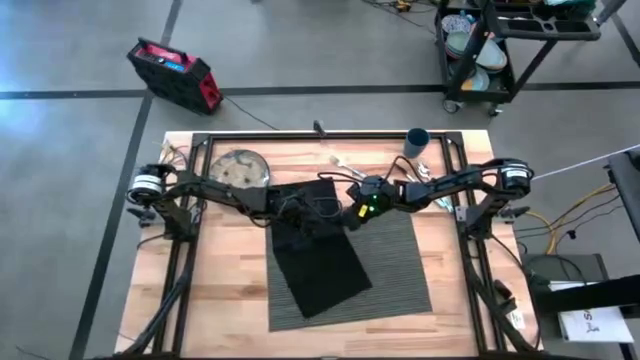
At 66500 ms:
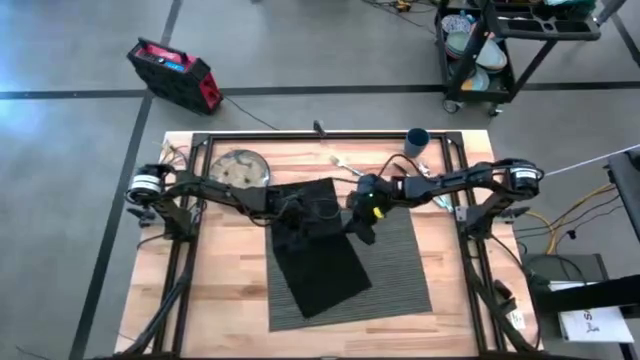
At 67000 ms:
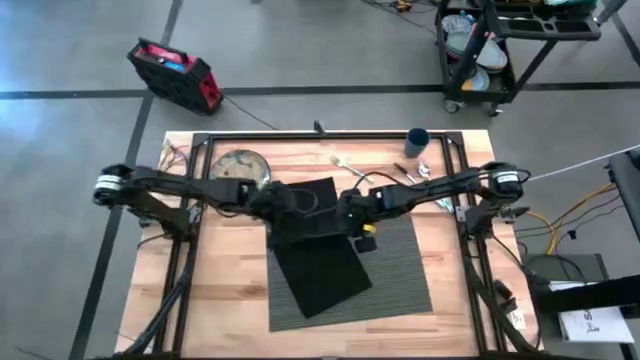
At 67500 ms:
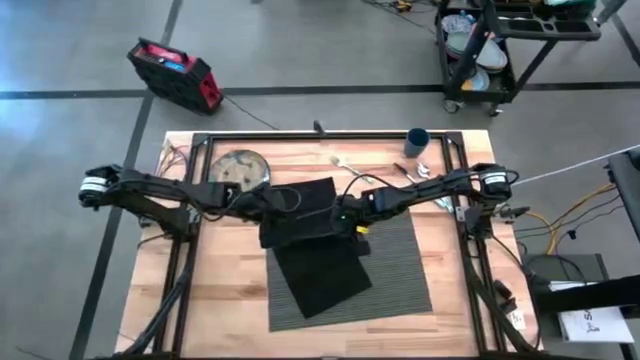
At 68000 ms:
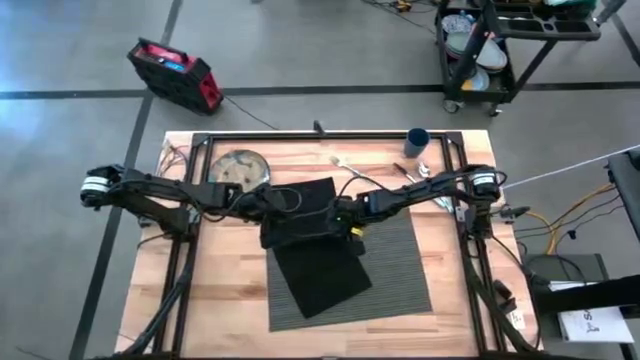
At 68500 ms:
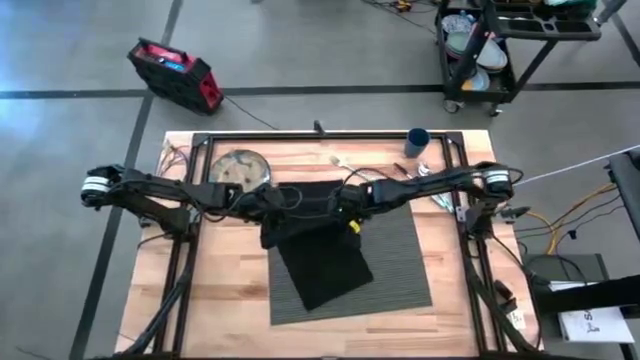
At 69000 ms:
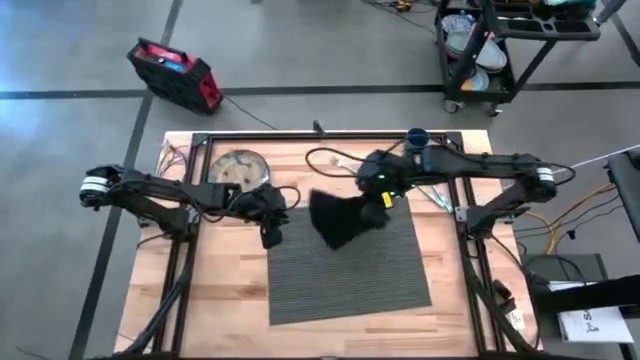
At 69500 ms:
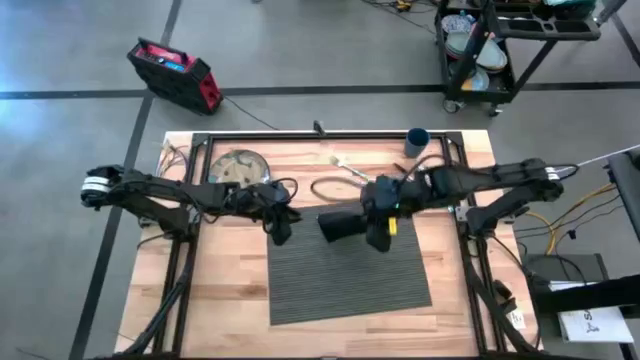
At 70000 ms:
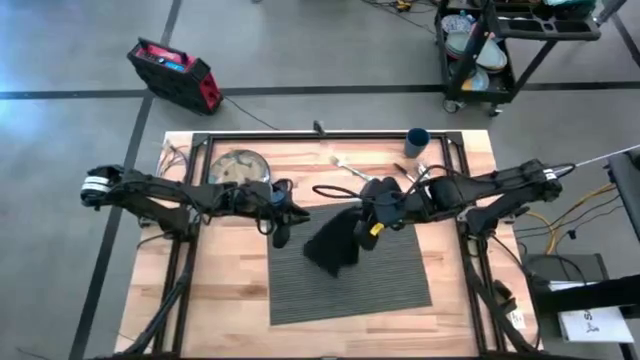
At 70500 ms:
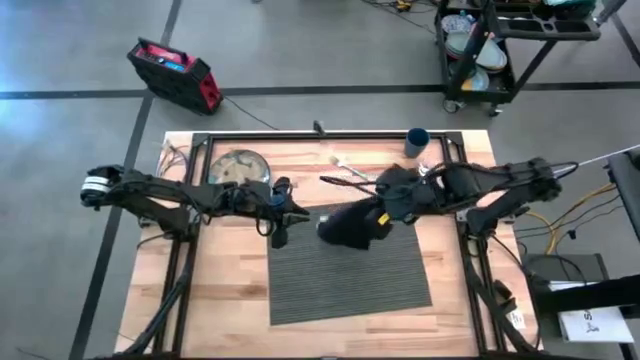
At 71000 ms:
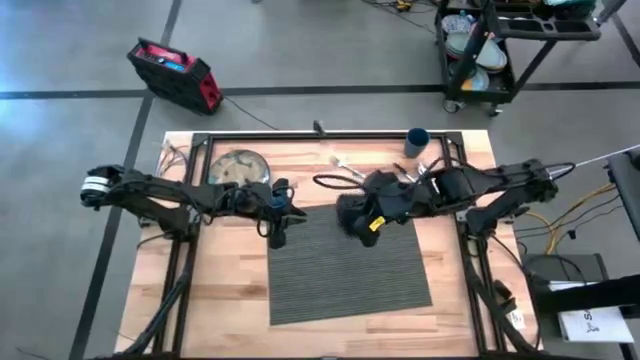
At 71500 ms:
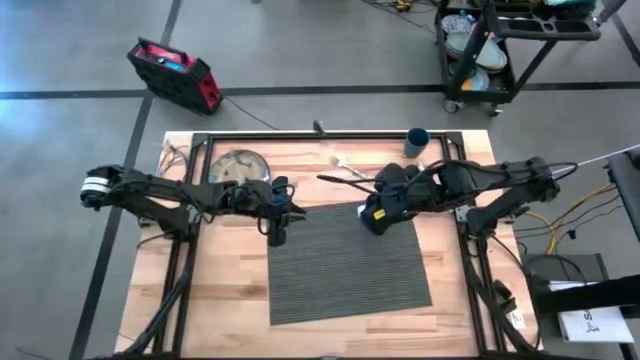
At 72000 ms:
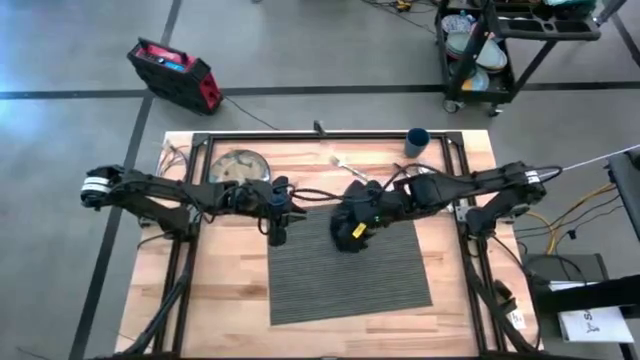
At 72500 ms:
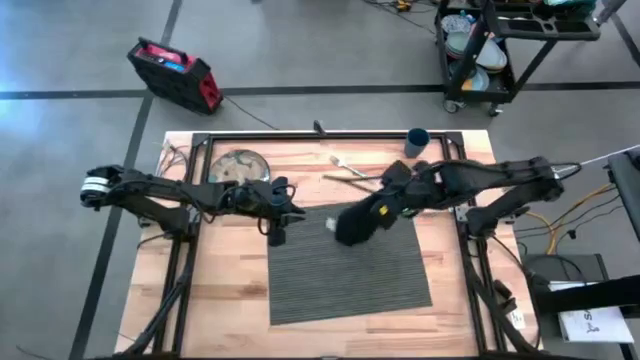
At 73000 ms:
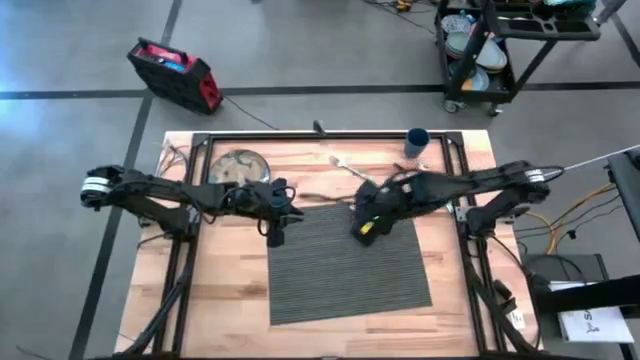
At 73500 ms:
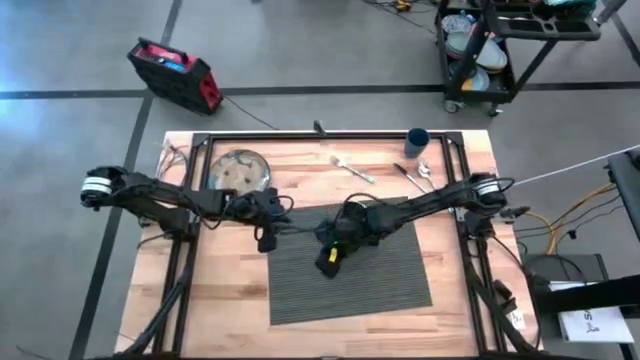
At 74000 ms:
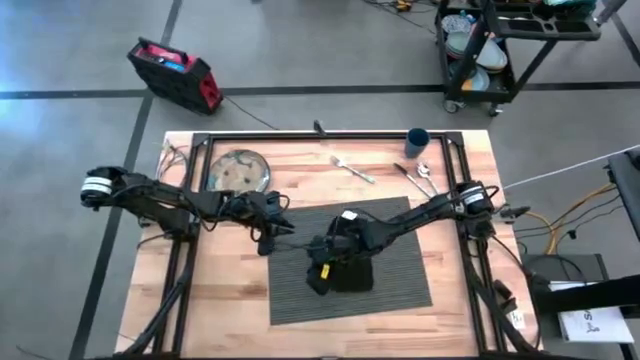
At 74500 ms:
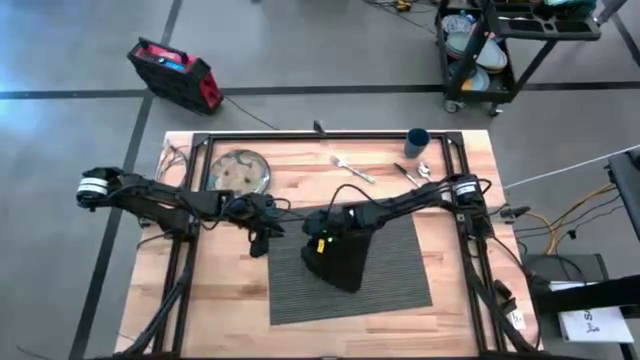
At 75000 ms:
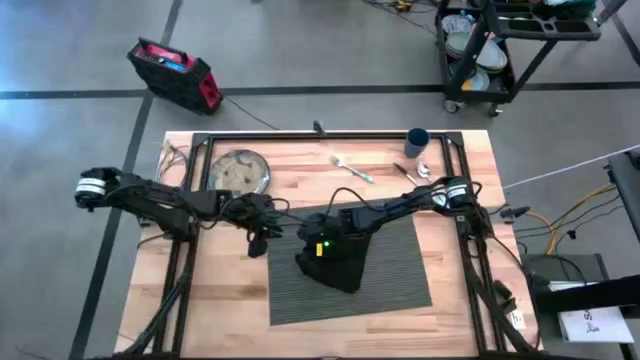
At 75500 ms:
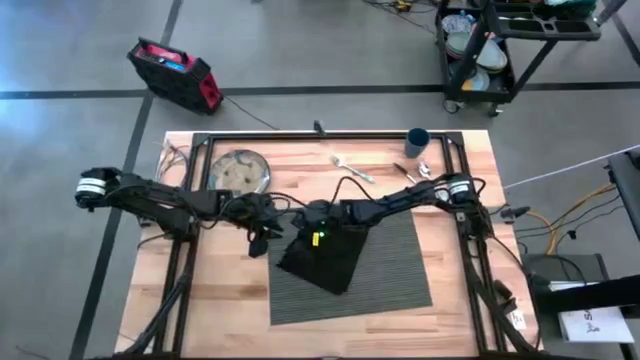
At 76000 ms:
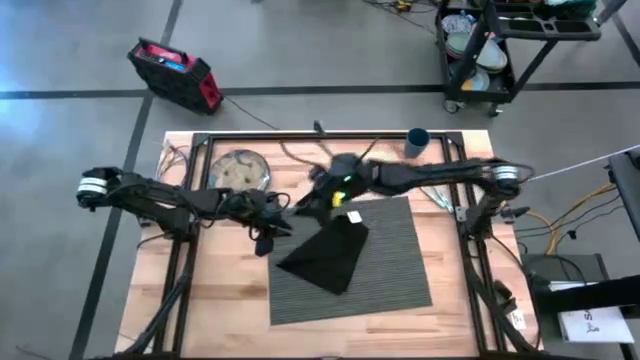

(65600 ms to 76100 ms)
Task: Set table place
Fold the black napkin

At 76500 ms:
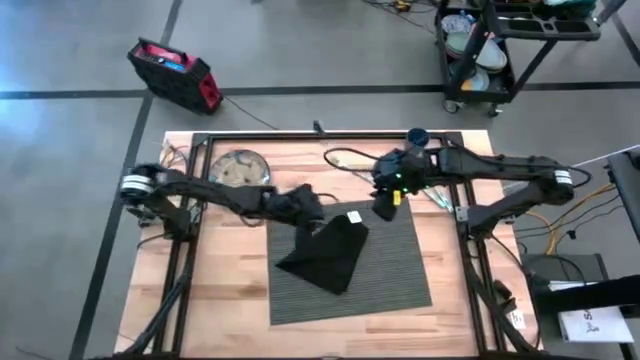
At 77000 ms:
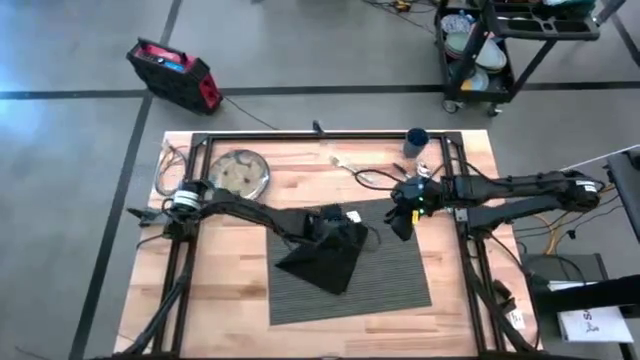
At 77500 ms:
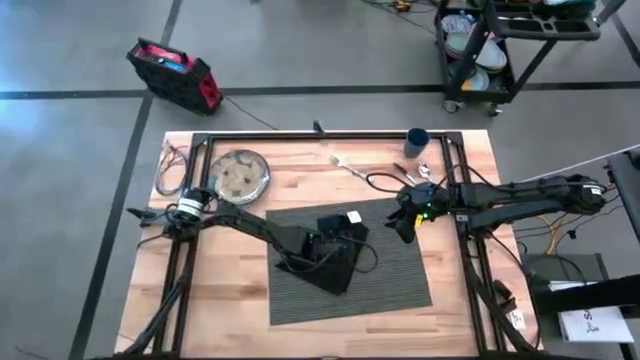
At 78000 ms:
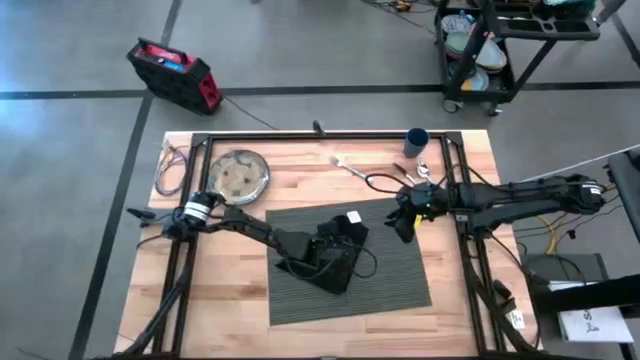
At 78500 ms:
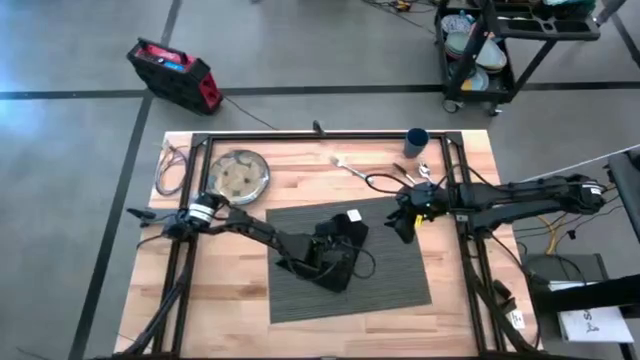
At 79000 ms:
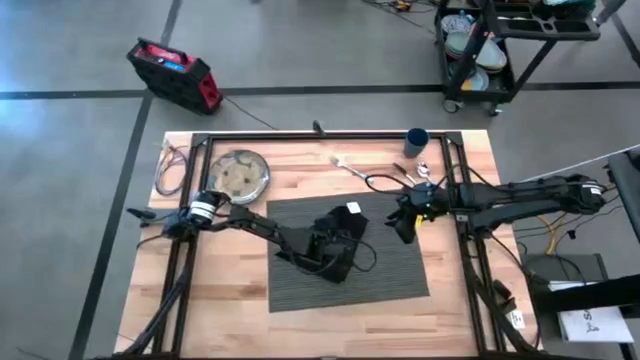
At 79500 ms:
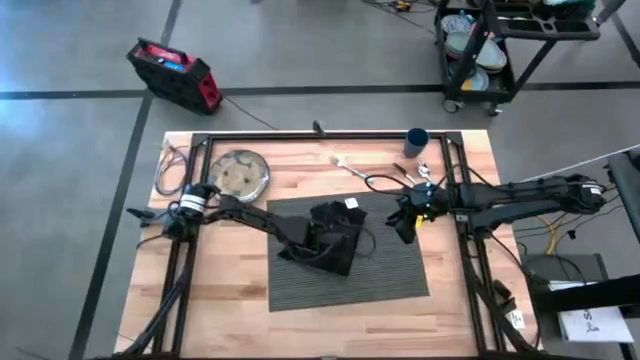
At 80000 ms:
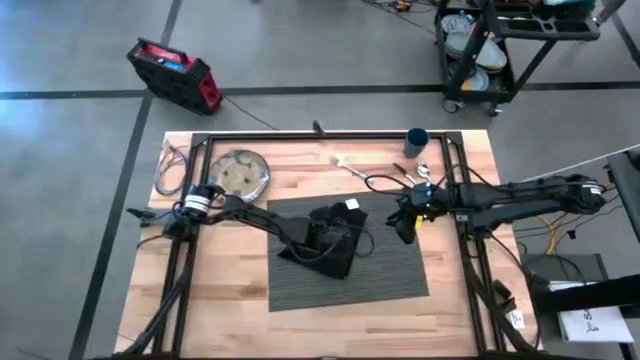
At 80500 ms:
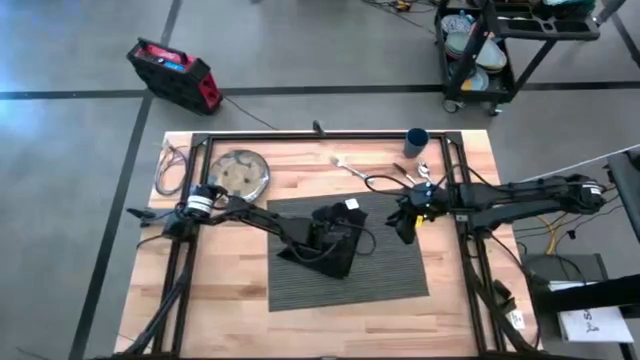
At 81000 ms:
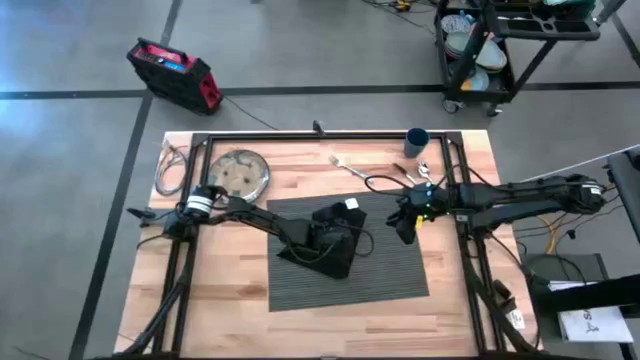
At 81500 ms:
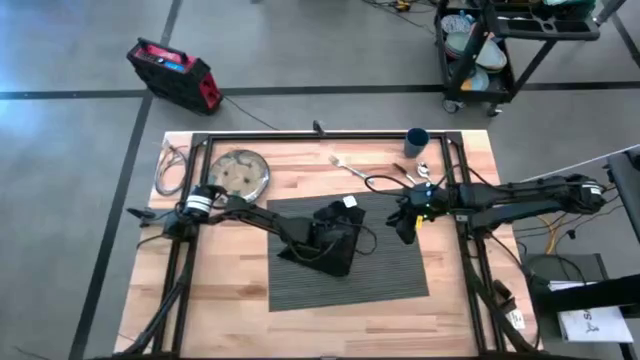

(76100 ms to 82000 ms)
Fold the black napkin

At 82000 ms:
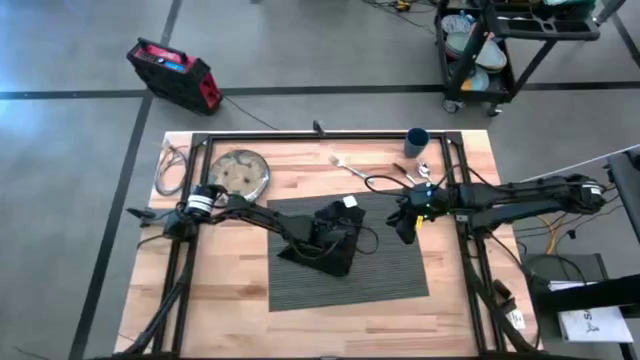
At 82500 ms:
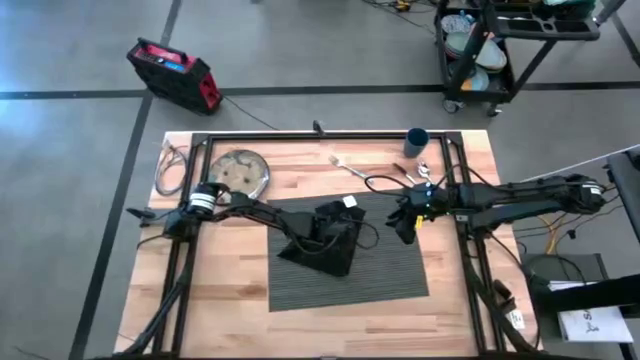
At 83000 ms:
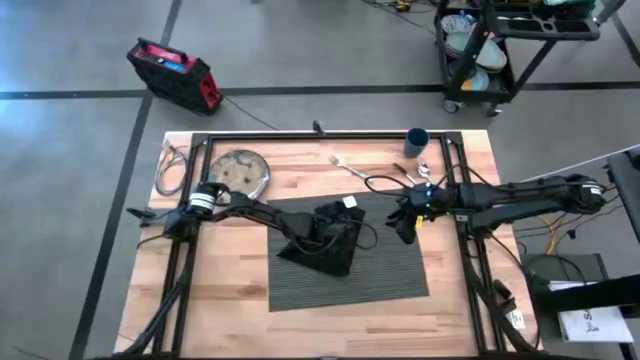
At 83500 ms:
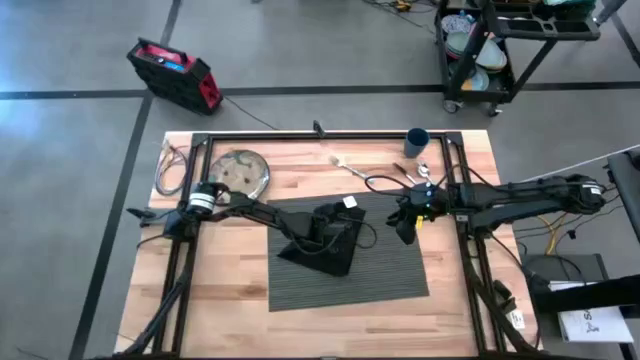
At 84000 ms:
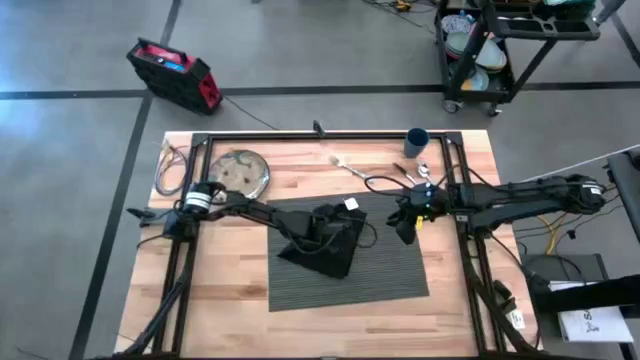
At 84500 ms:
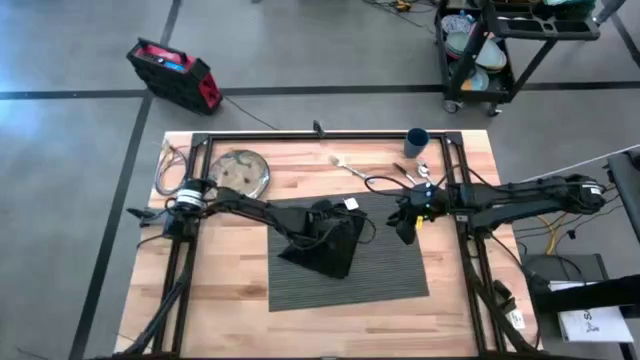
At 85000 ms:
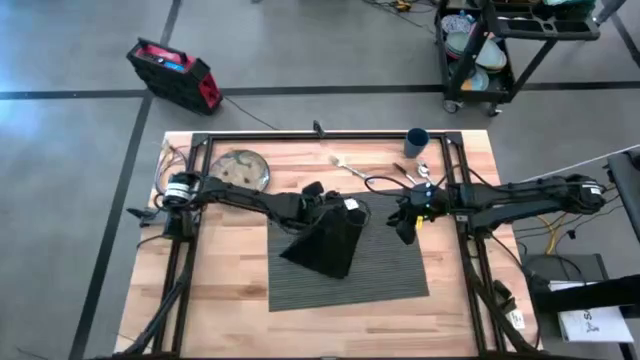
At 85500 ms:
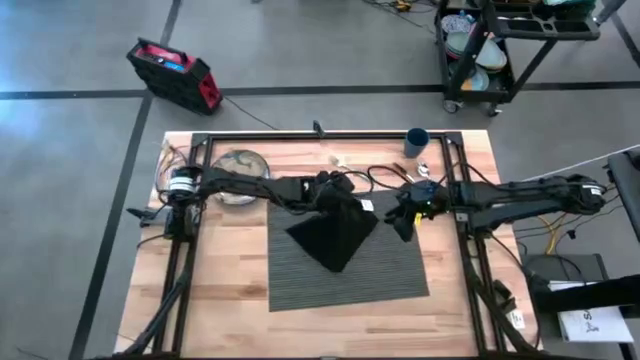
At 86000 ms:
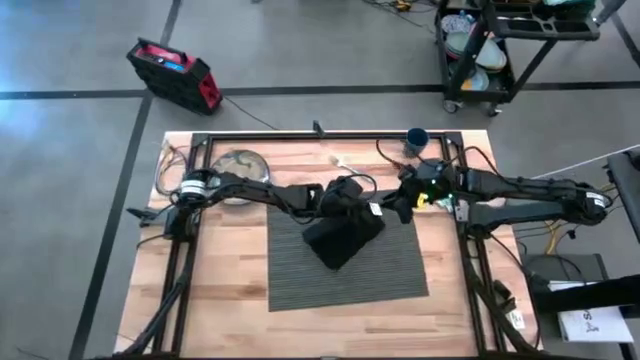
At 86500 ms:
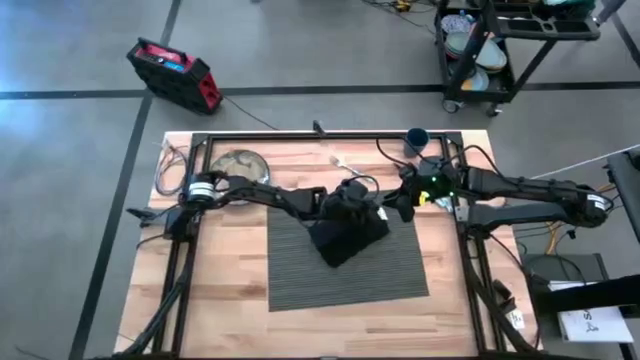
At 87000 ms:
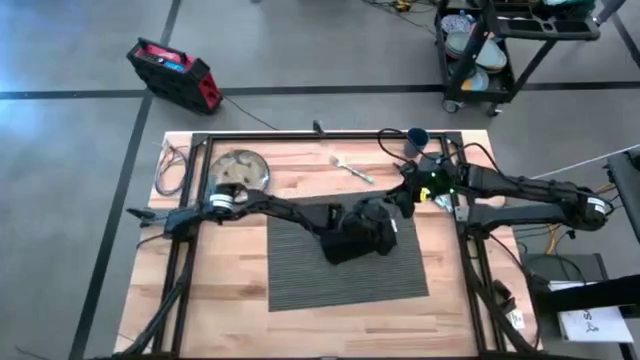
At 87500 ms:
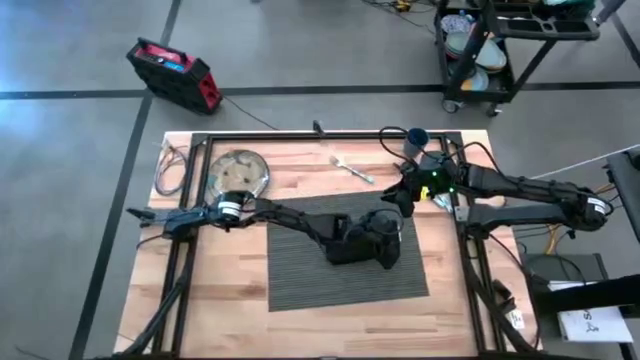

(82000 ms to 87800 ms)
Fold the black napkin
